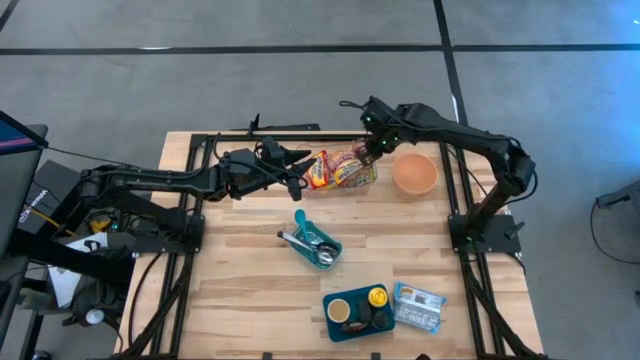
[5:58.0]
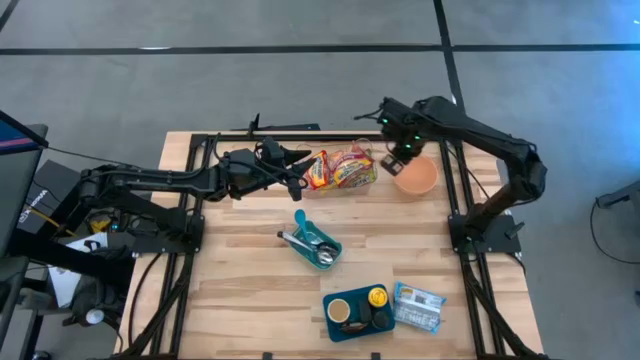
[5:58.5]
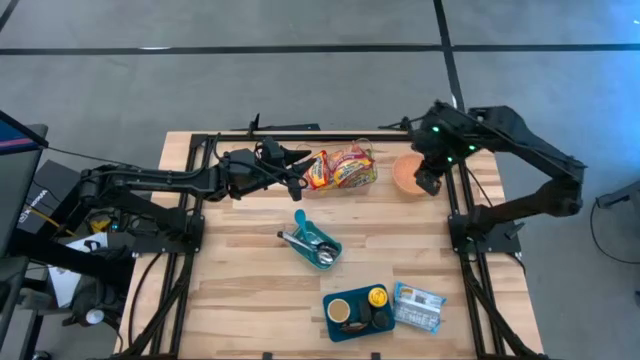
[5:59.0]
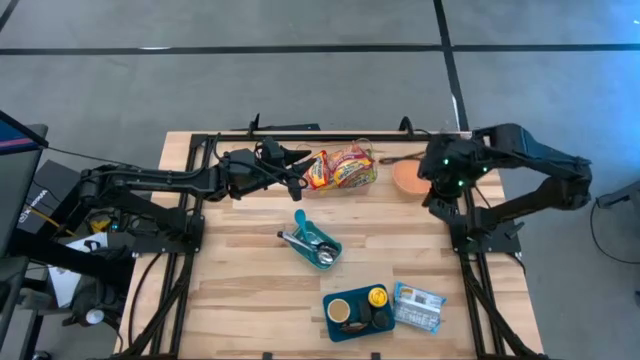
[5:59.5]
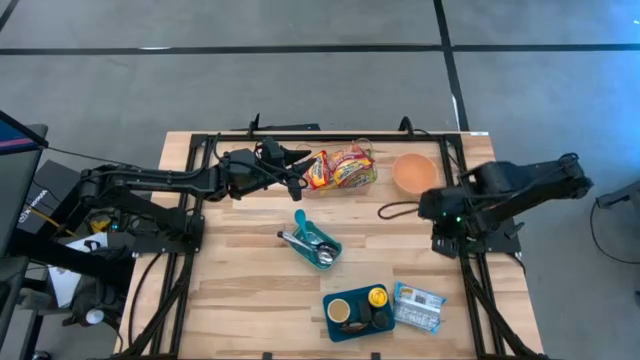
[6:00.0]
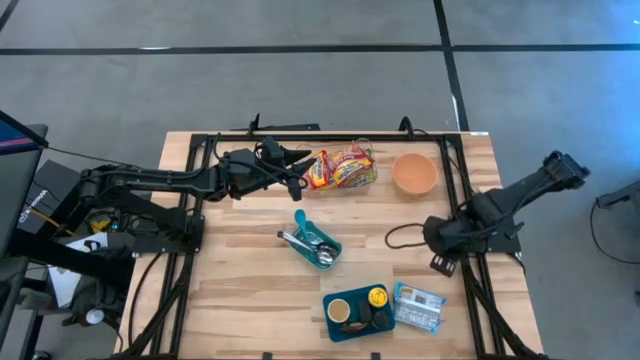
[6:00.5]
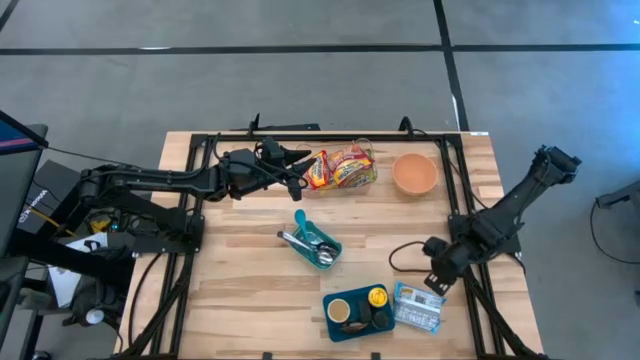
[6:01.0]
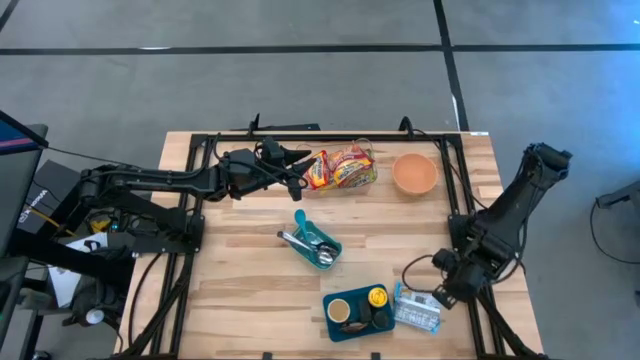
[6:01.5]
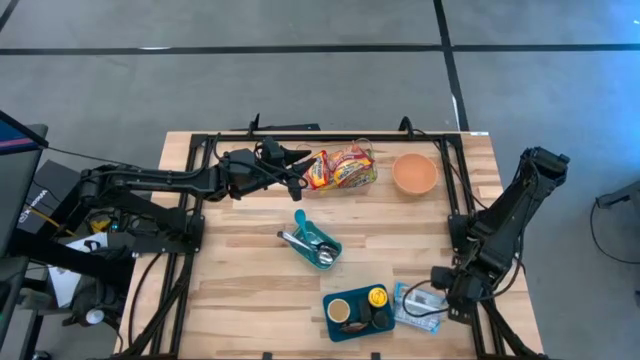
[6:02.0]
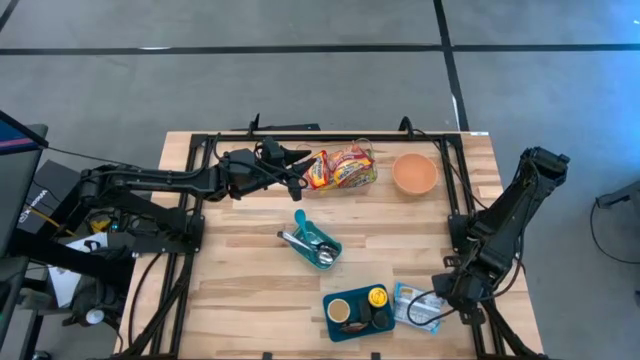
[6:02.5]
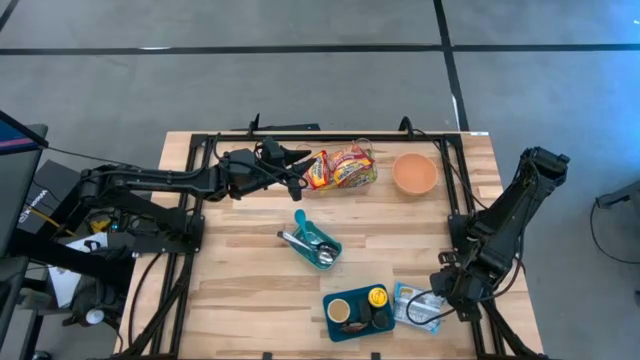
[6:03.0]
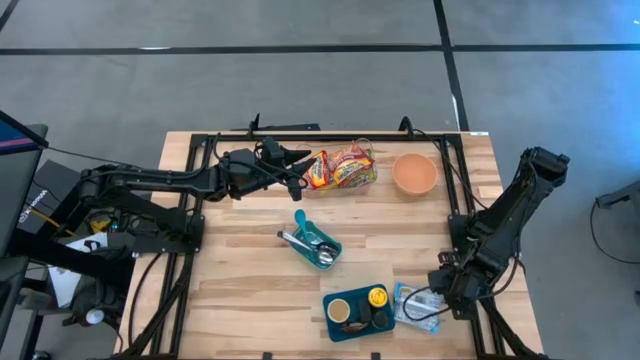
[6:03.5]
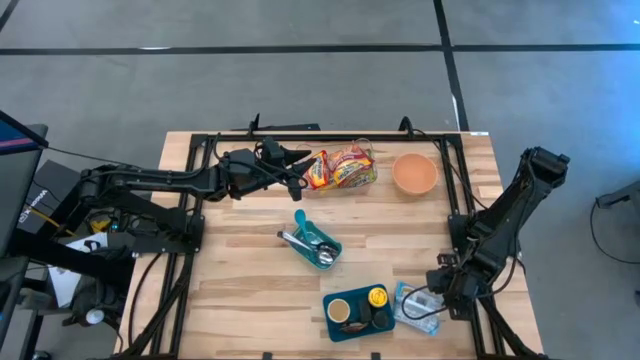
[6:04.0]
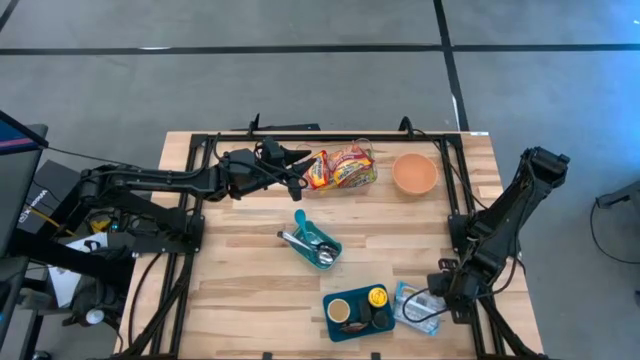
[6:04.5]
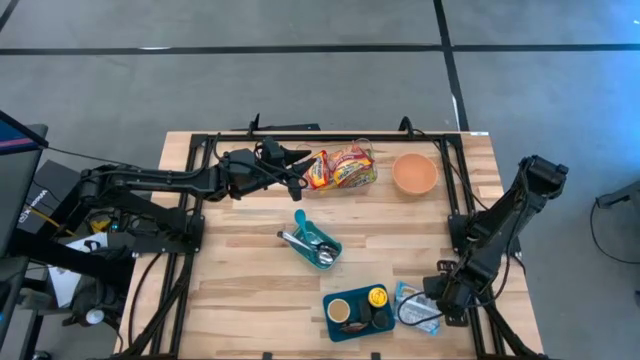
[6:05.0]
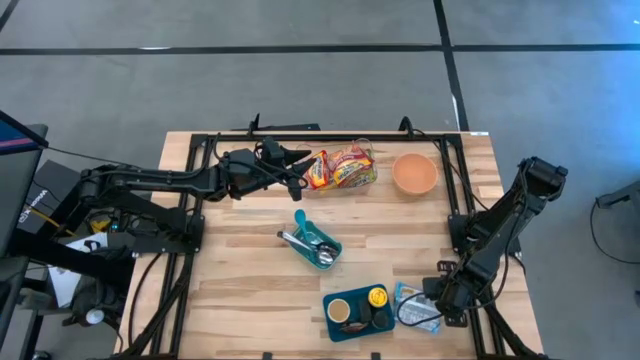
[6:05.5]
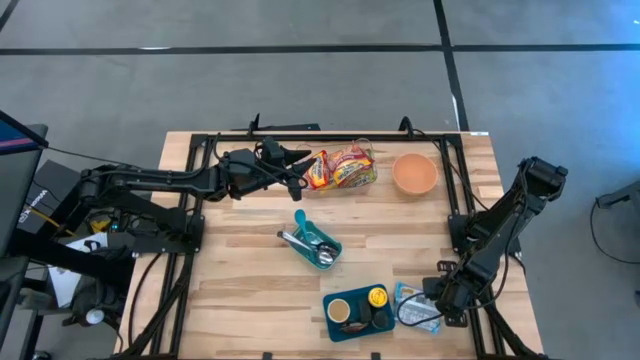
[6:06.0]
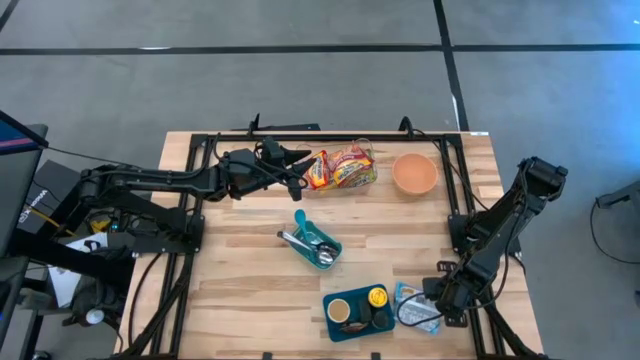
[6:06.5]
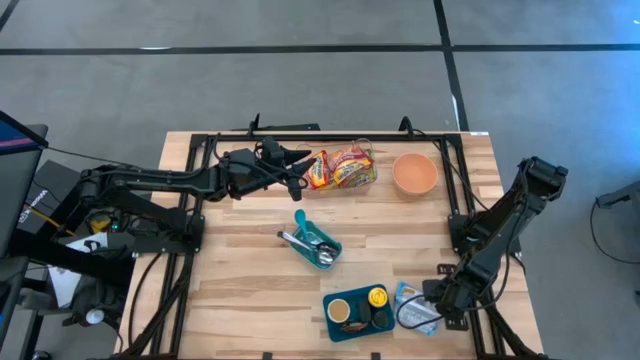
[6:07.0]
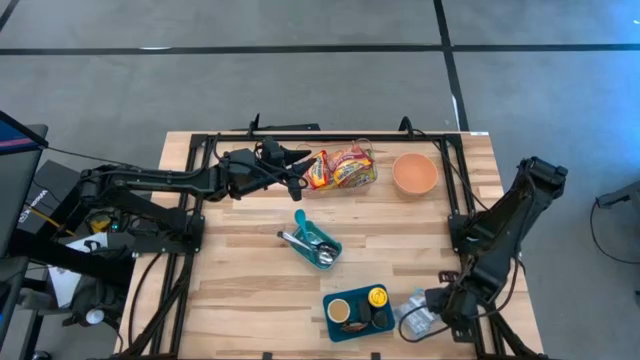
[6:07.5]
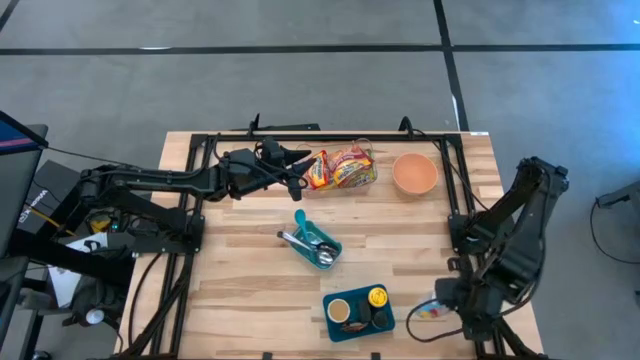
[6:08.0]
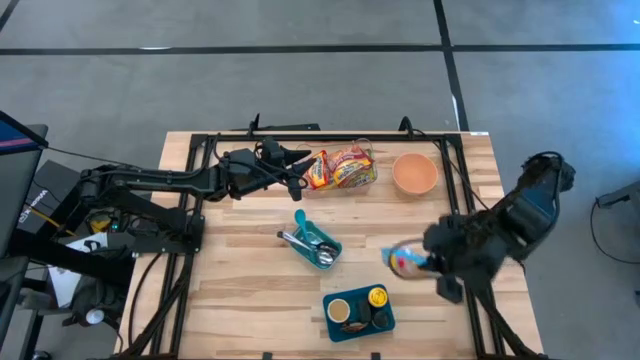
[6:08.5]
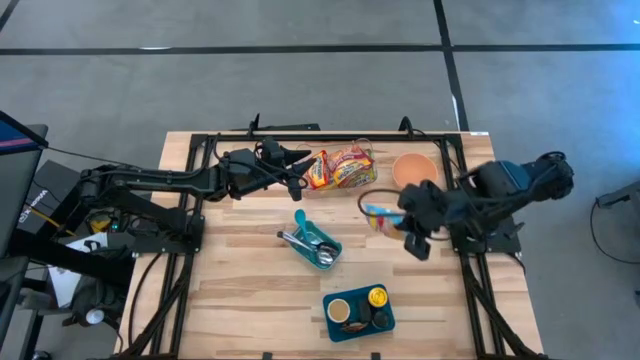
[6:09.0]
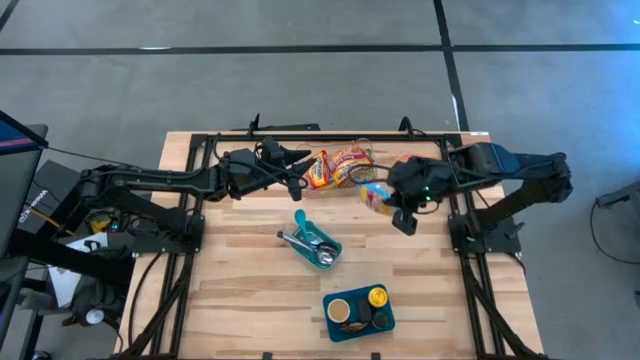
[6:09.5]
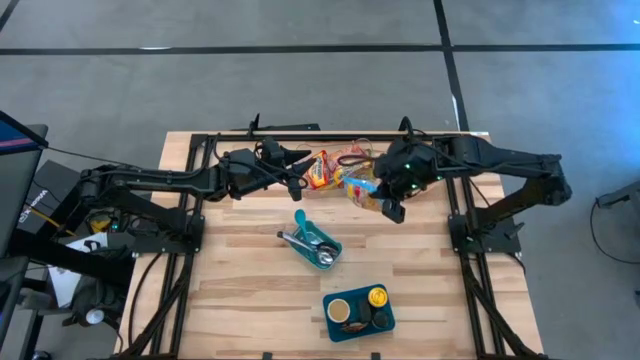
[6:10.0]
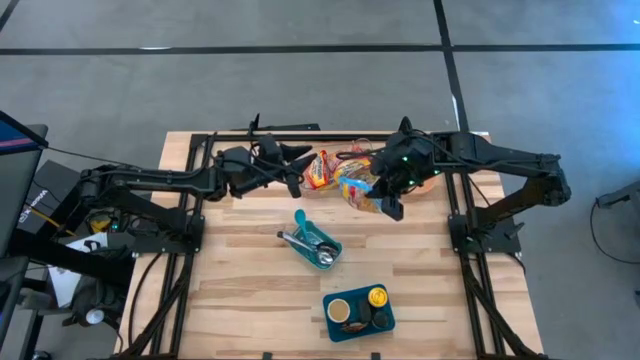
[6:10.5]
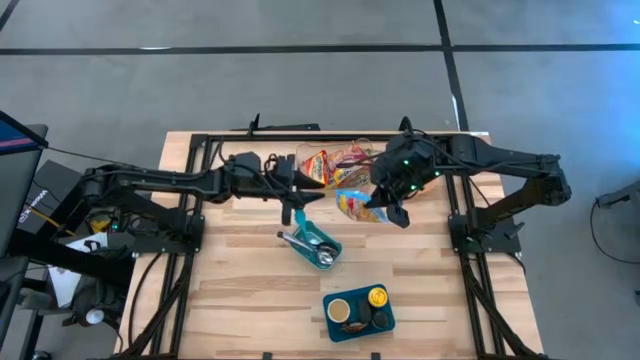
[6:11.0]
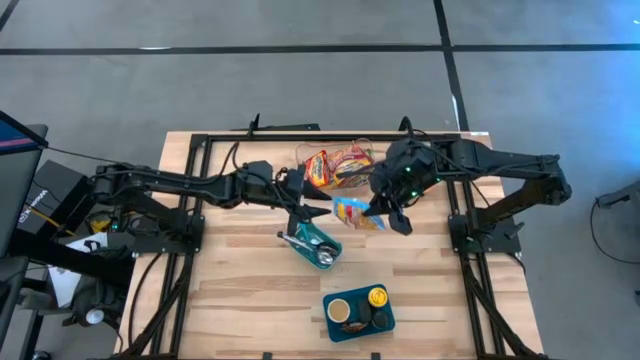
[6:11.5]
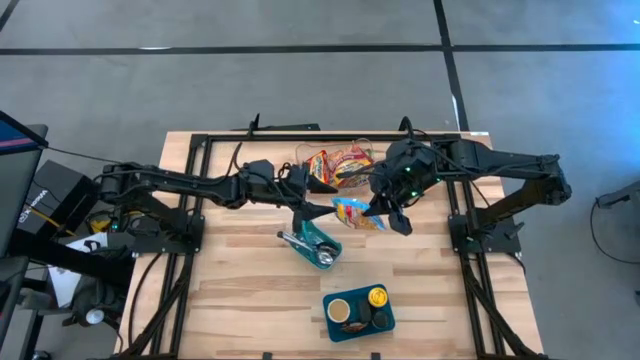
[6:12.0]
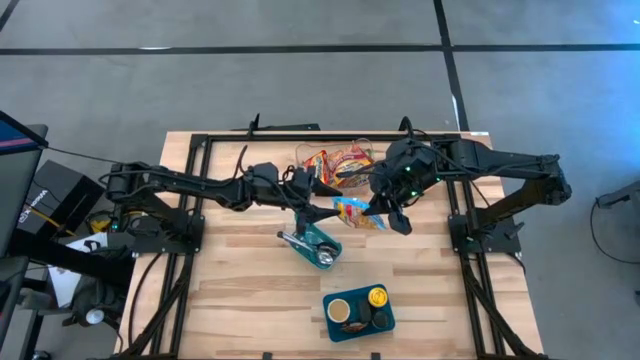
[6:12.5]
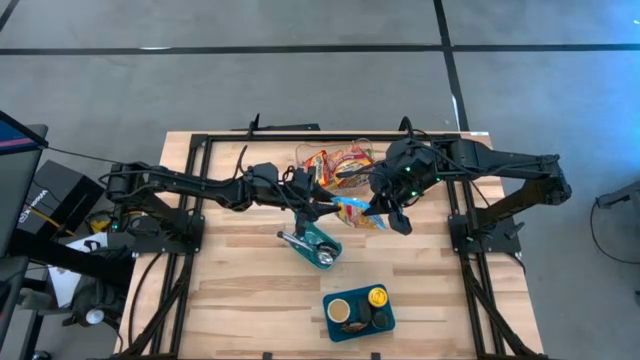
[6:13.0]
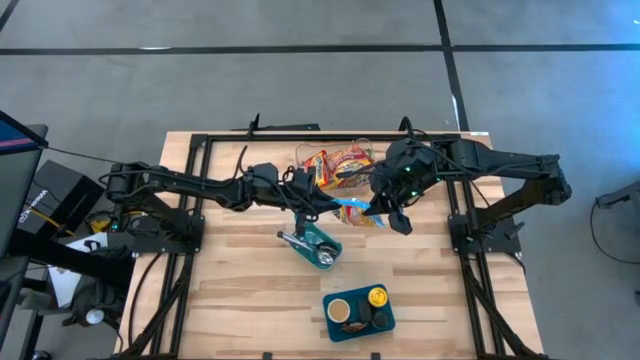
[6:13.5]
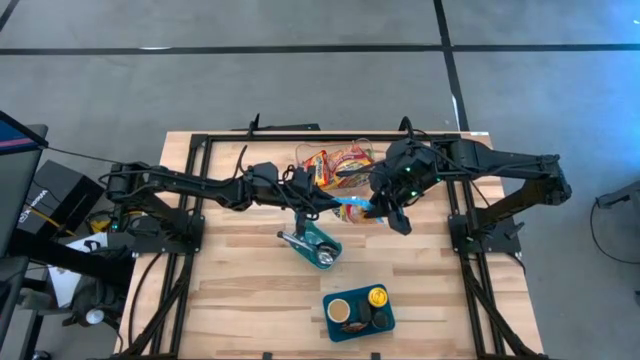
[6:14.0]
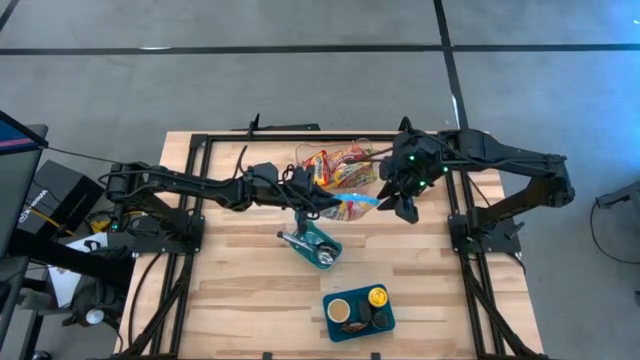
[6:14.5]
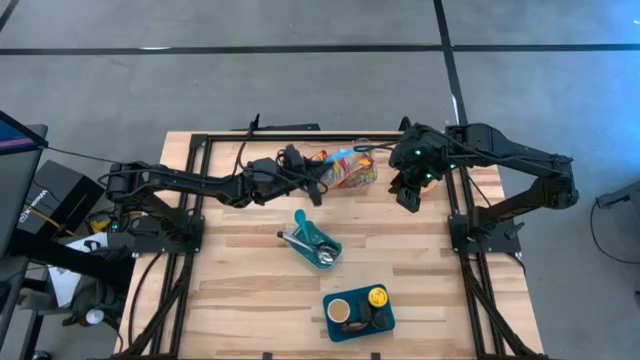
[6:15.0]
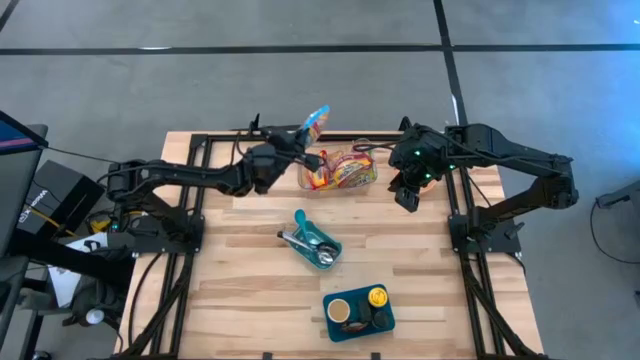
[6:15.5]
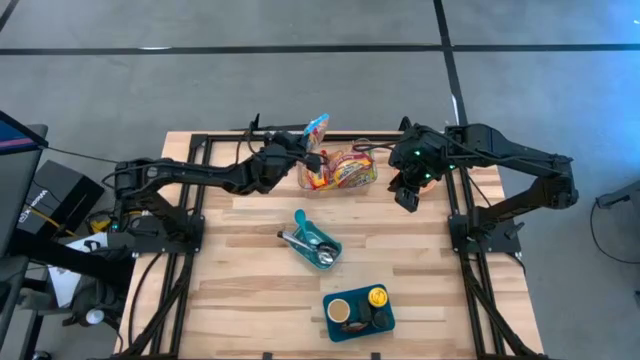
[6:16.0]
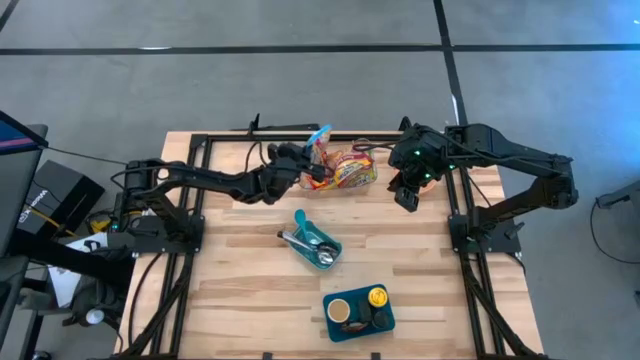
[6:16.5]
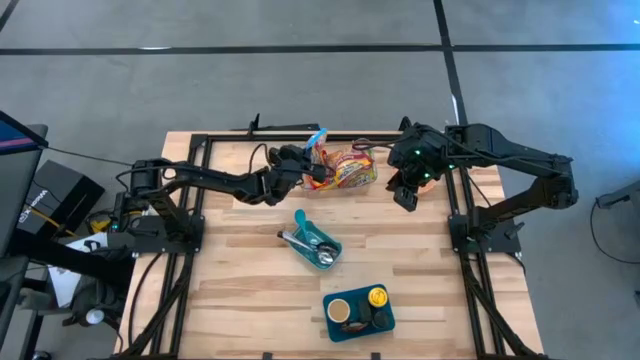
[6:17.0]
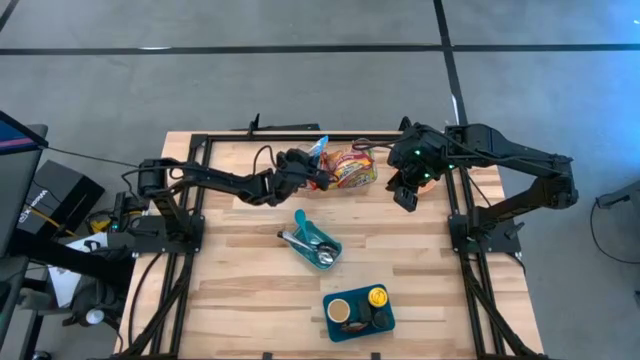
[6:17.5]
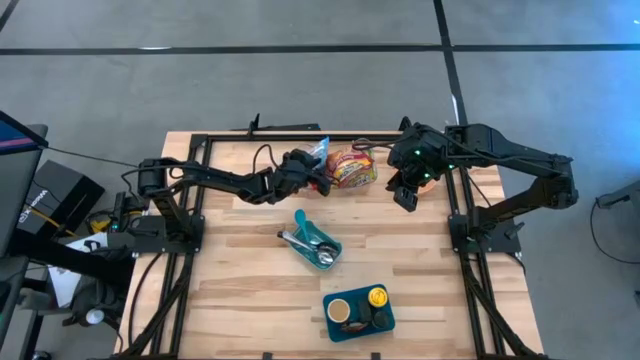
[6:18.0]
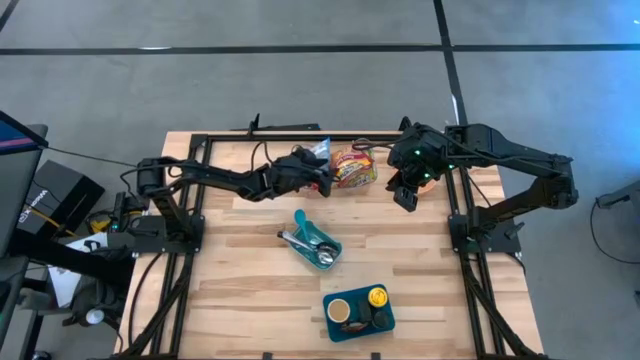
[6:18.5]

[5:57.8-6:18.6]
Task: Pick & Place Food Item
Put the blue noodle pack into the transparent bin

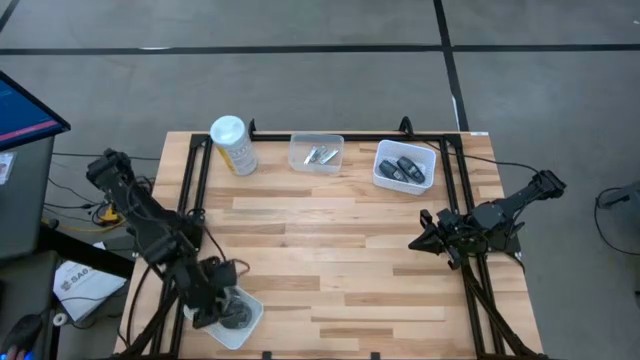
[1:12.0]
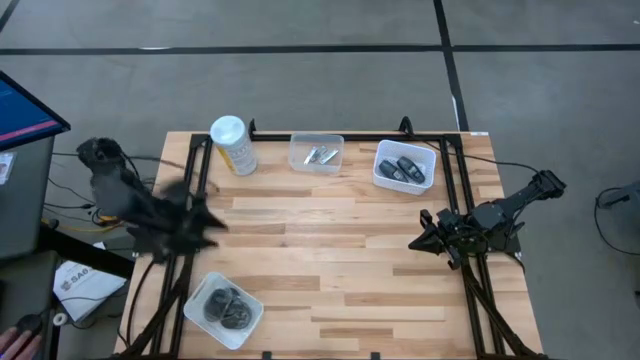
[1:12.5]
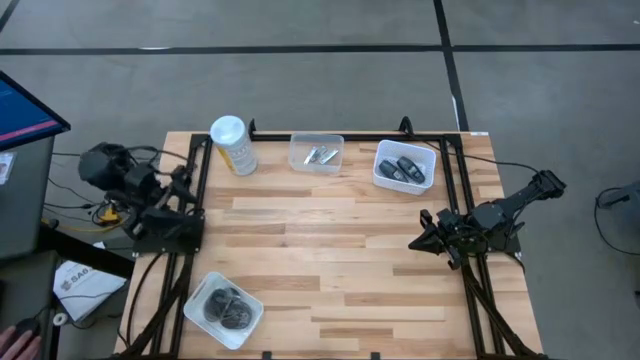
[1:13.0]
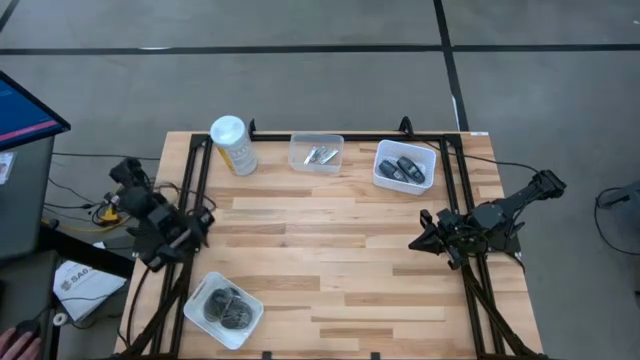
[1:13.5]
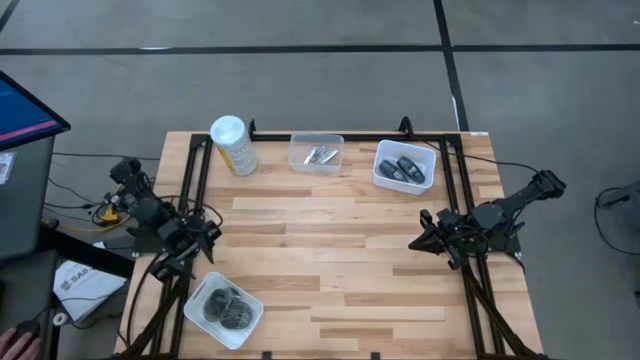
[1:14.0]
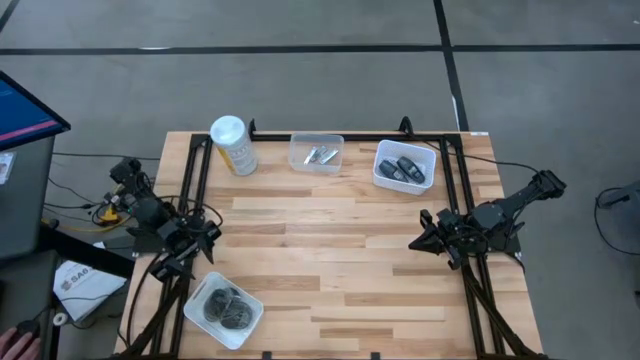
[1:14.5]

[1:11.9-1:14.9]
Task: Pick & Place Travel size toiletries
Return to Home Position
